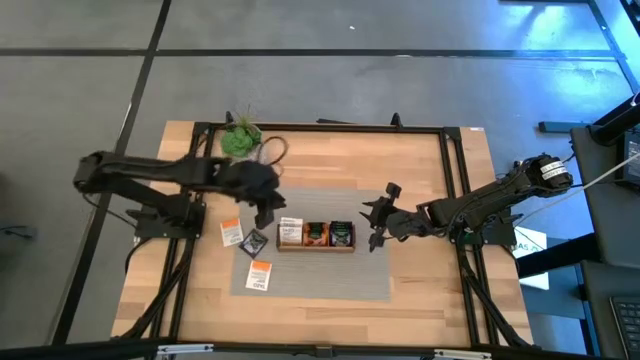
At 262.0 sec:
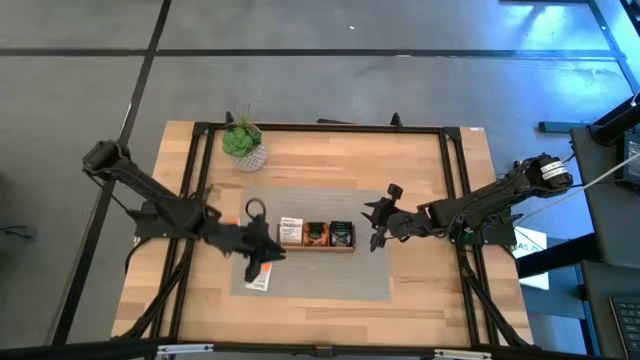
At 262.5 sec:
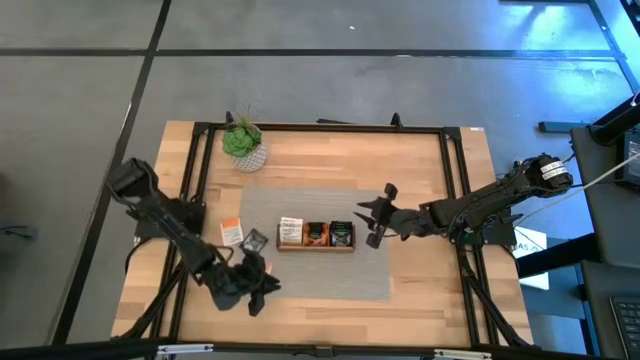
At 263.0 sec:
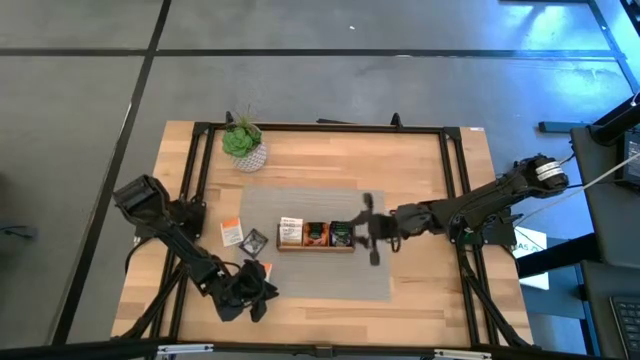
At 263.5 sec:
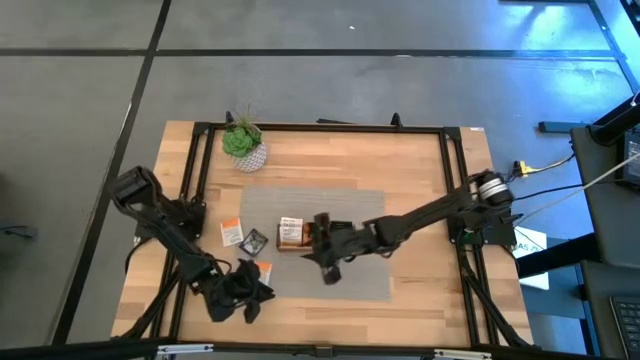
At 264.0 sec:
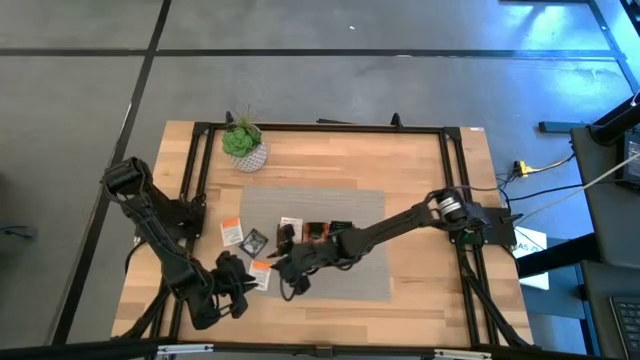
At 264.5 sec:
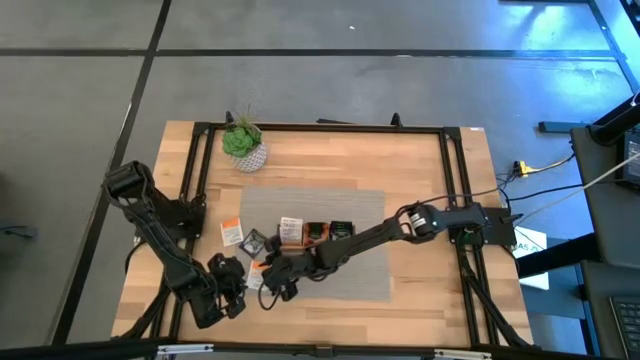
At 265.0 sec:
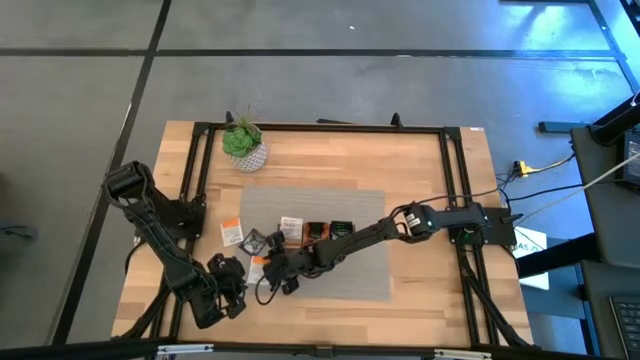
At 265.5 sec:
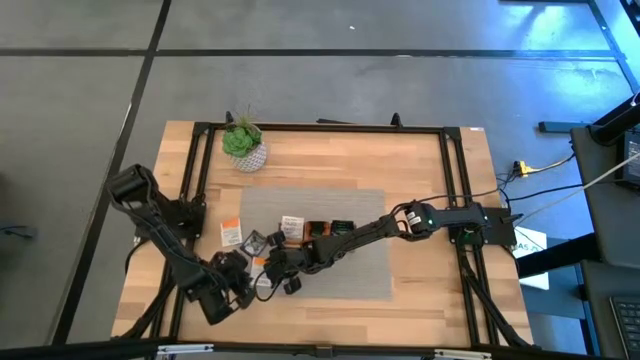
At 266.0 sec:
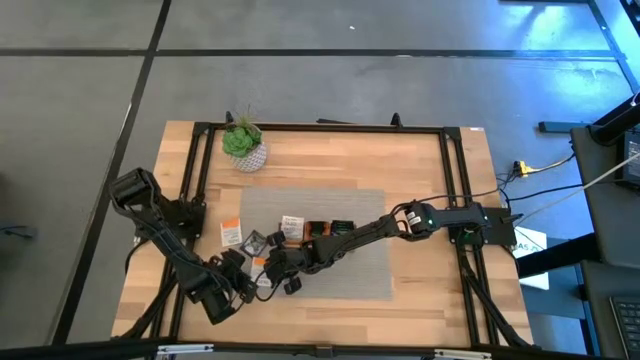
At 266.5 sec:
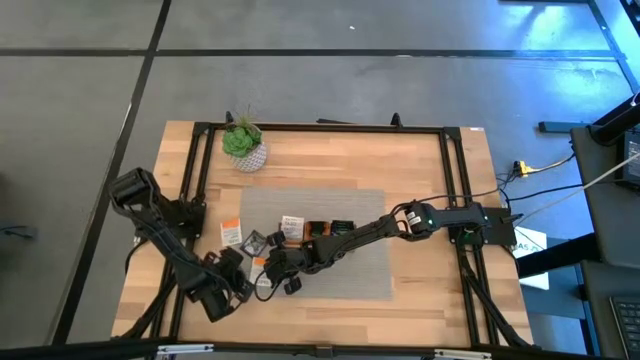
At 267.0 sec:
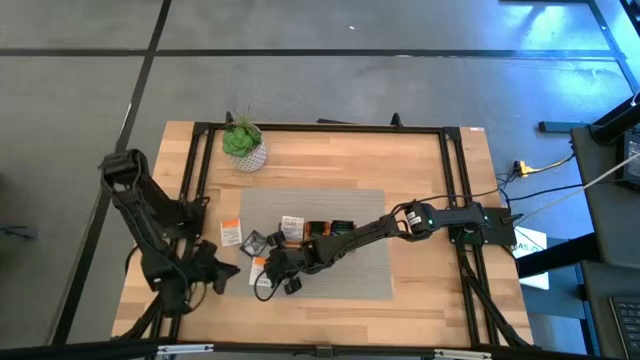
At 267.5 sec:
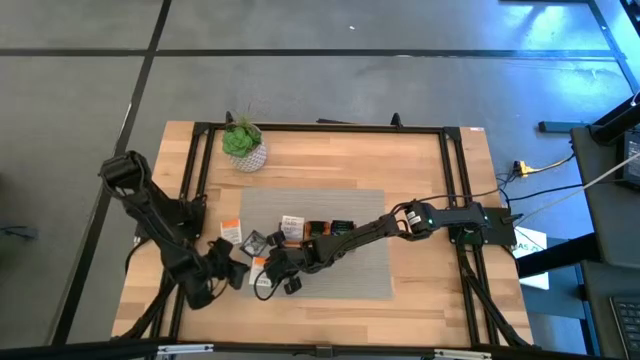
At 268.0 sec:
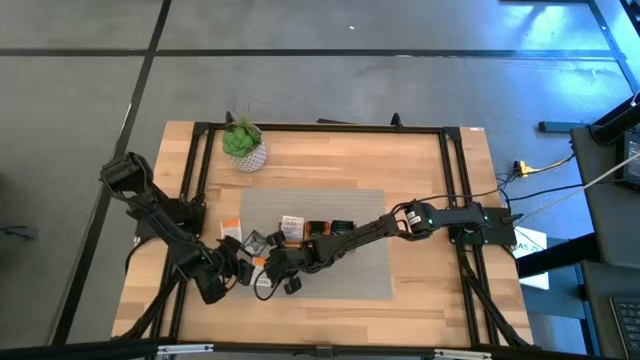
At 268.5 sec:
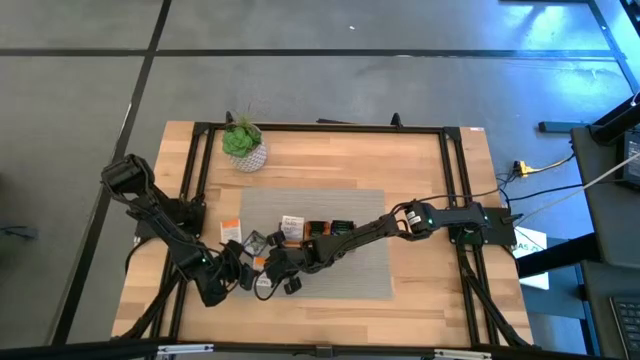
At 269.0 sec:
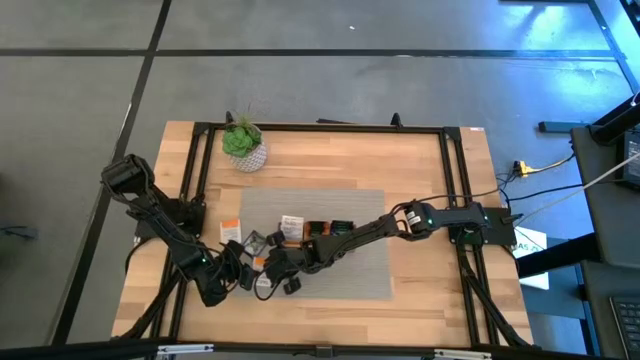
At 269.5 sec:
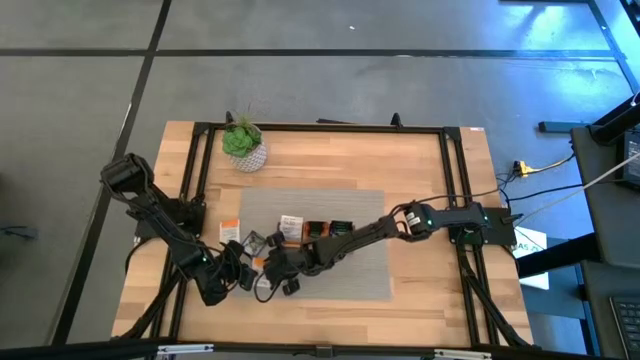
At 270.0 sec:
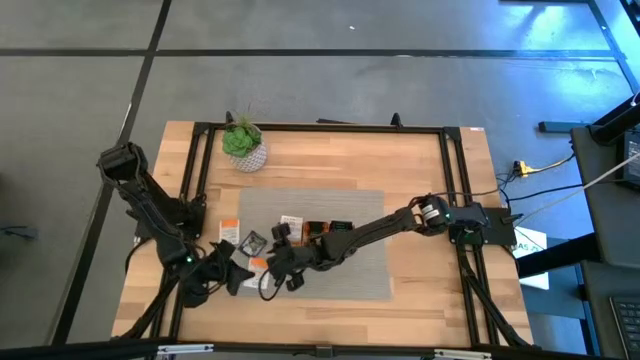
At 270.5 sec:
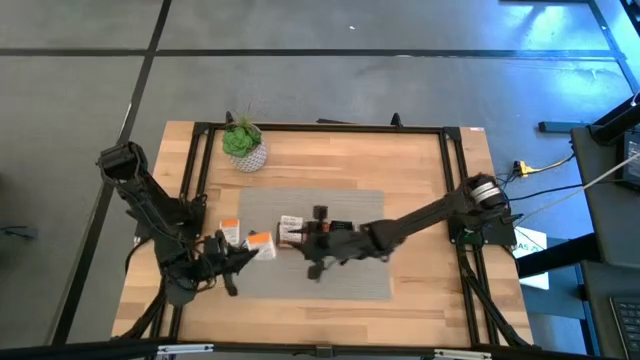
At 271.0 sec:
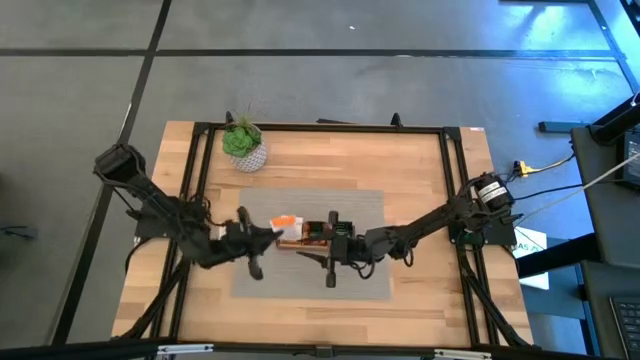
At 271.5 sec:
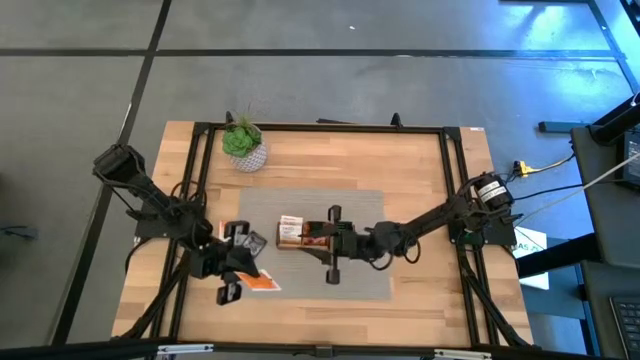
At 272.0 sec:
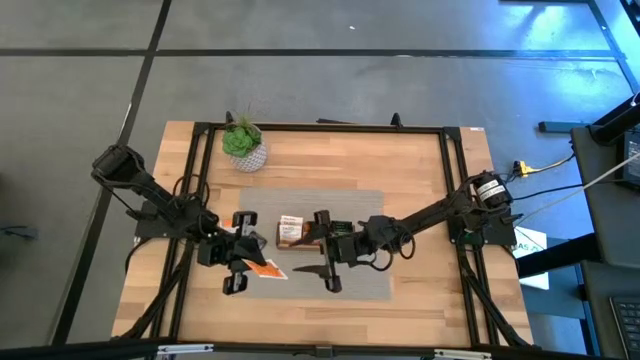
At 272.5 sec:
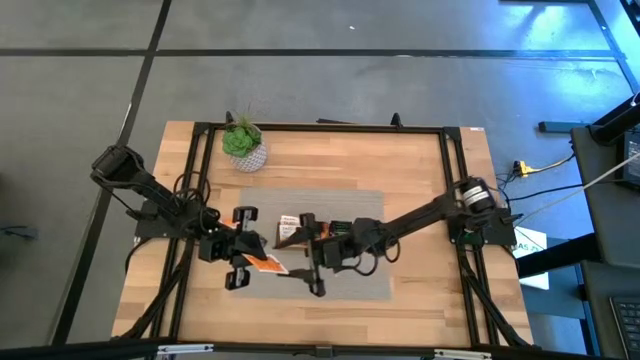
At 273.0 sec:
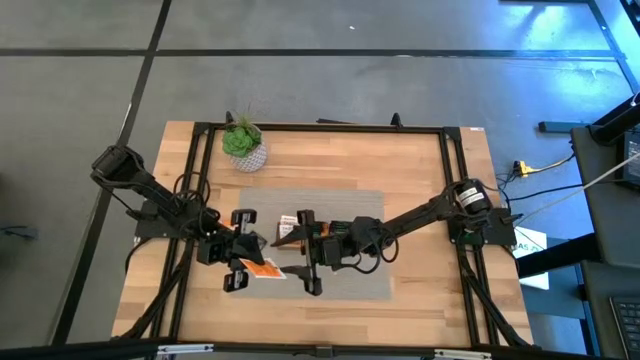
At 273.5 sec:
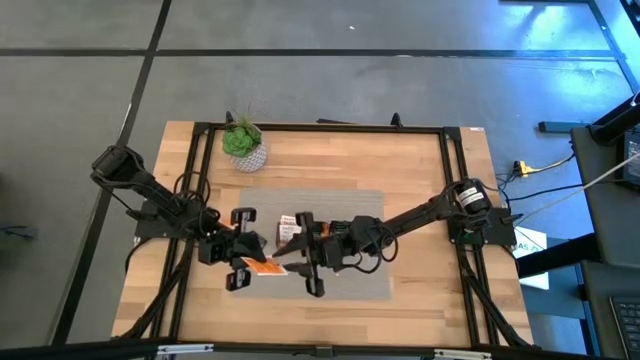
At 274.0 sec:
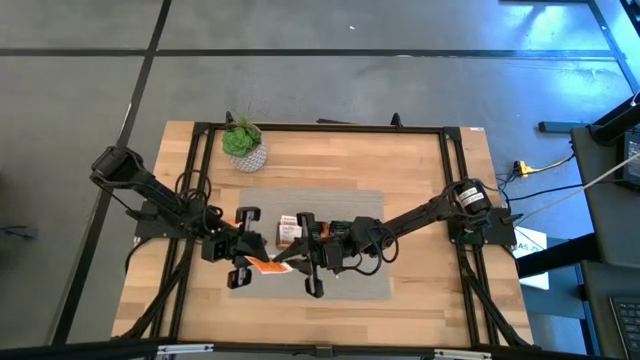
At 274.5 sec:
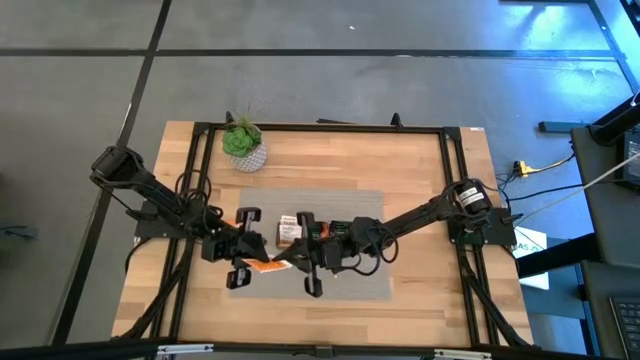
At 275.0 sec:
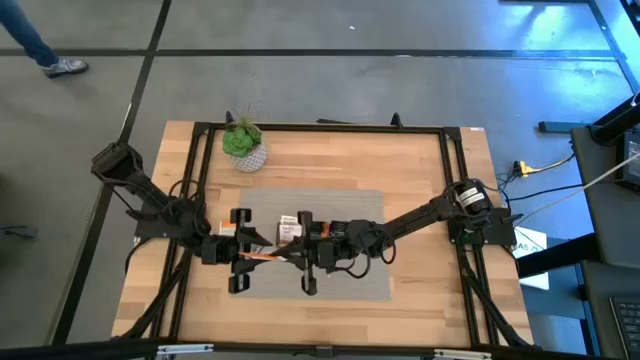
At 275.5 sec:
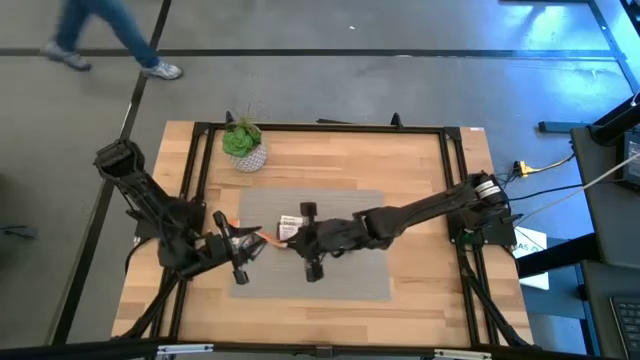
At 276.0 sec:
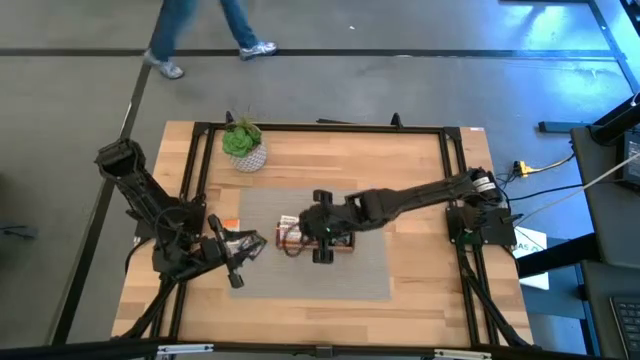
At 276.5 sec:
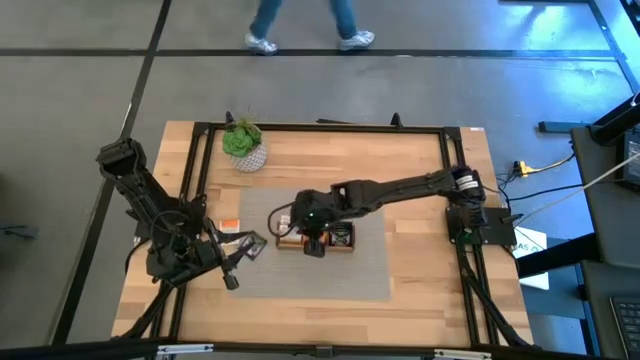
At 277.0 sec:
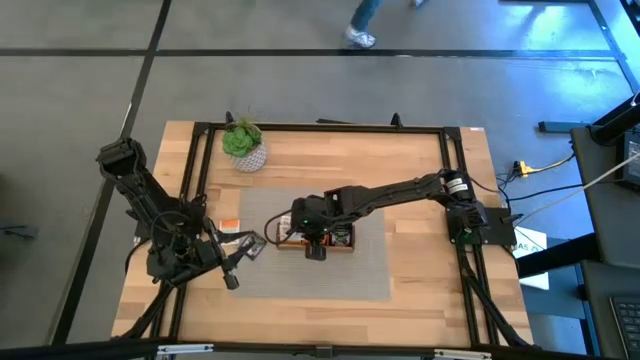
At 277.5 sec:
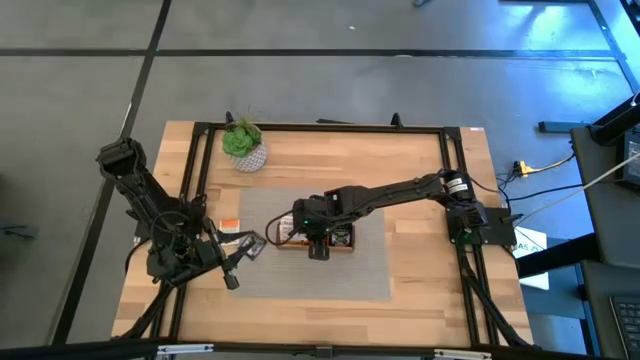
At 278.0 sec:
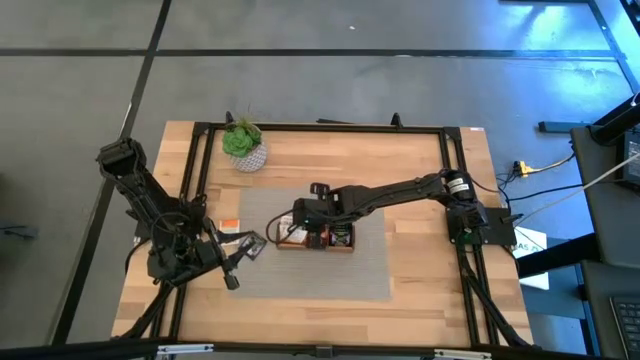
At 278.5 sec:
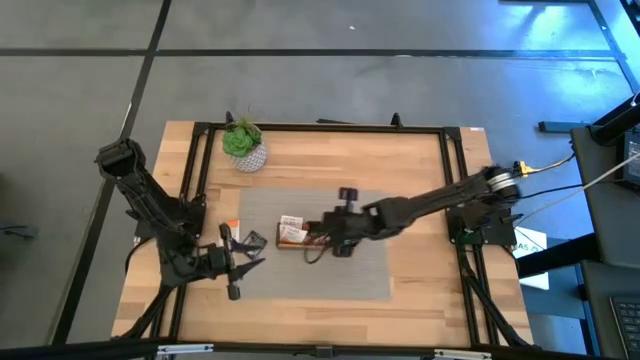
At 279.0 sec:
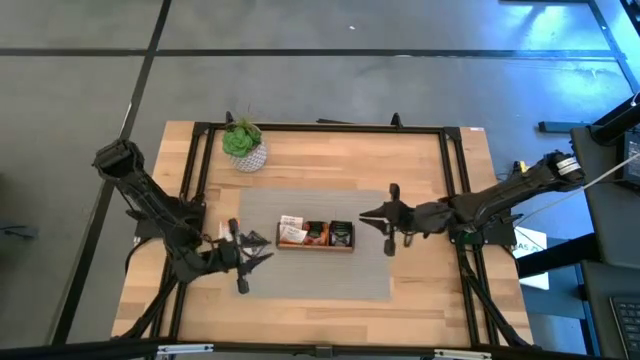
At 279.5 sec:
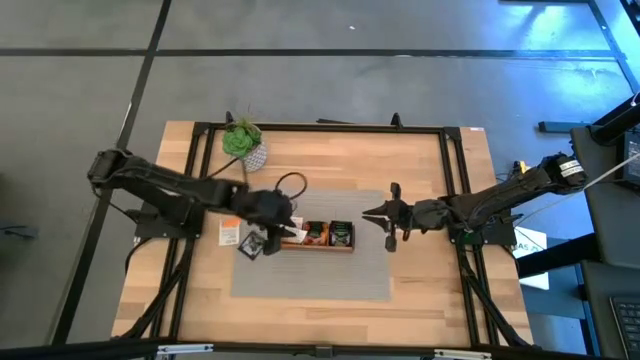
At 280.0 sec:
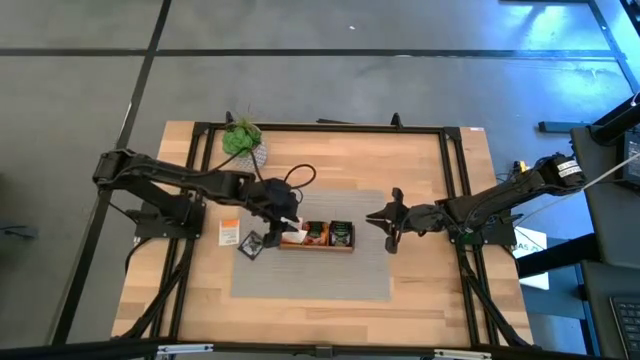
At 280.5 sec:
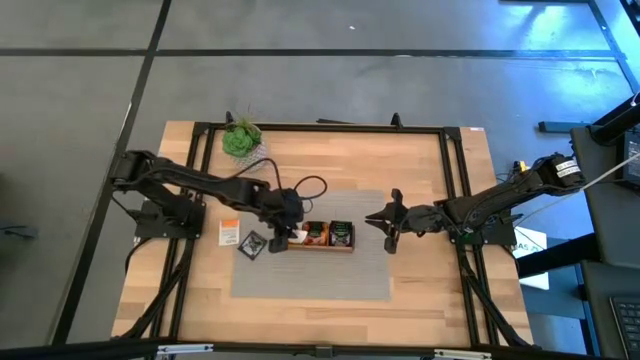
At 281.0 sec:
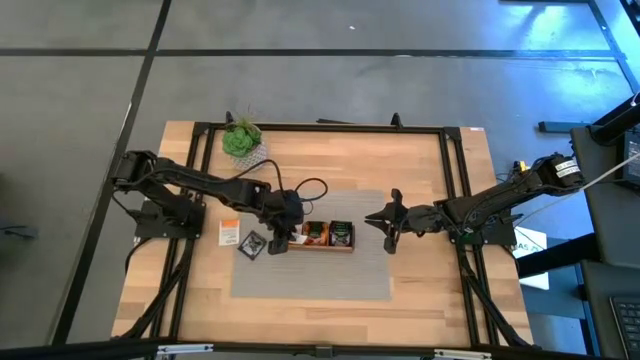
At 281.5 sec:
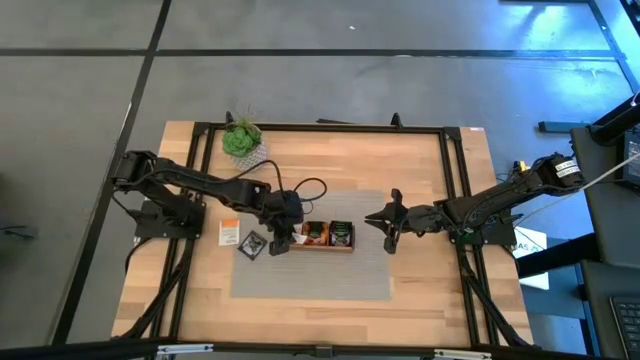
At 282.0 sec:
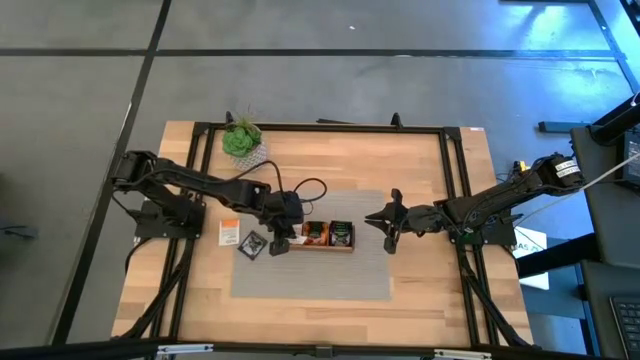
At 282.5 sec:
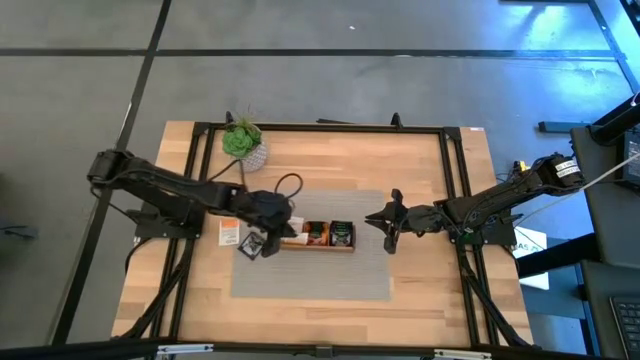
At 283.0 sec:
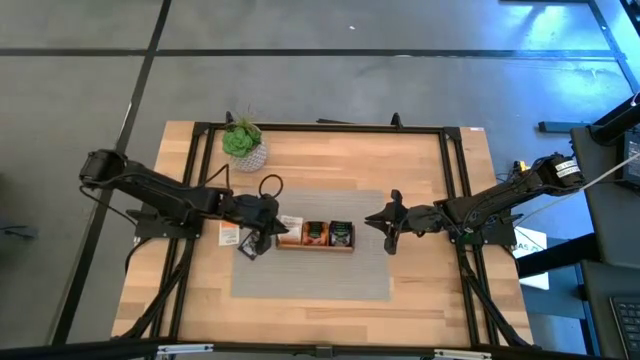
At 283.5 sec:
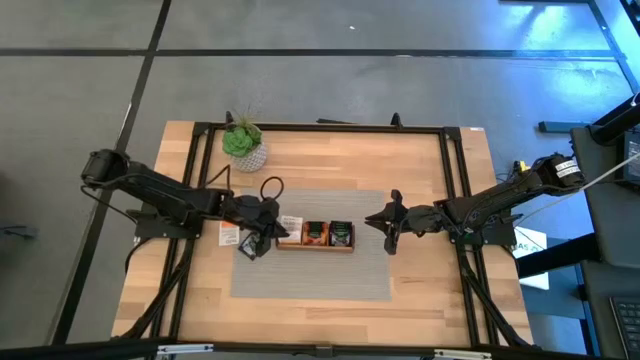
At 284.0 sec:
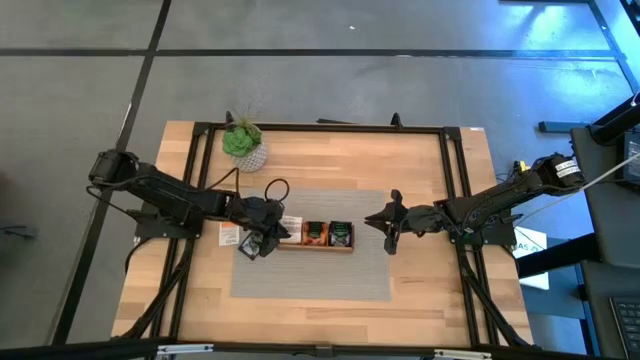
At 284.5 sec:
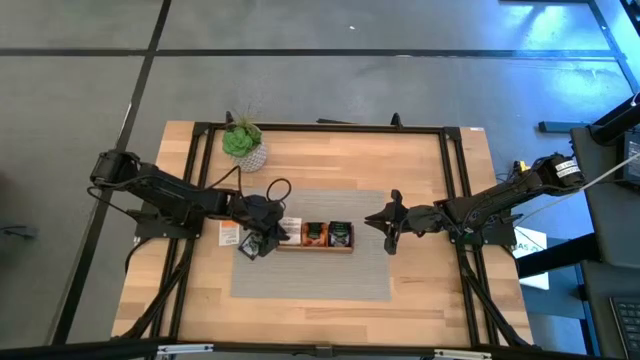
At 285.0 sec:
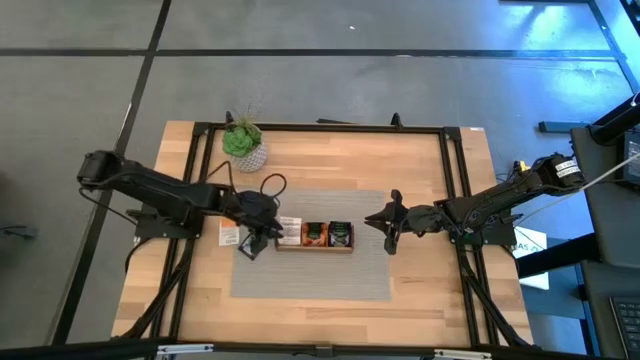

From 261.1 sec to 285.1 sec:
Task: Pick & Place Tea
Put the white tea bag into the left section of the wooden organizer
